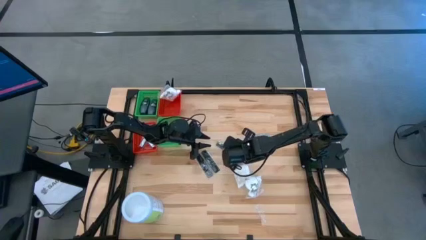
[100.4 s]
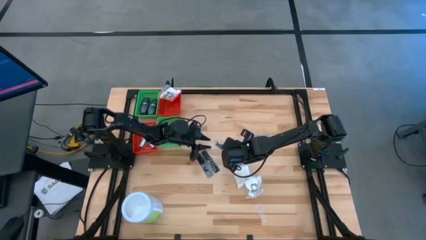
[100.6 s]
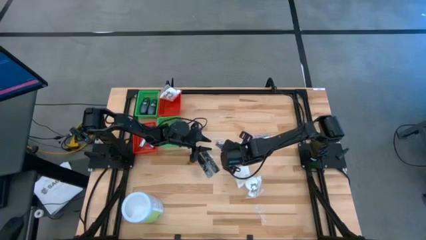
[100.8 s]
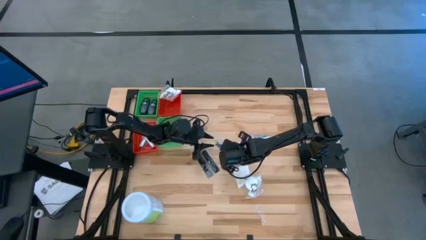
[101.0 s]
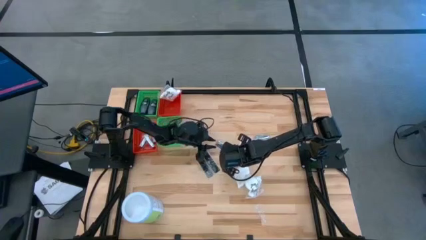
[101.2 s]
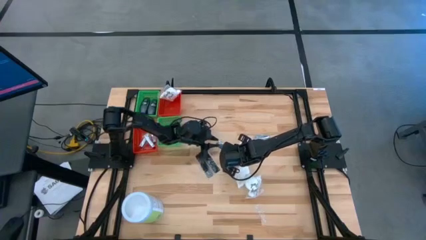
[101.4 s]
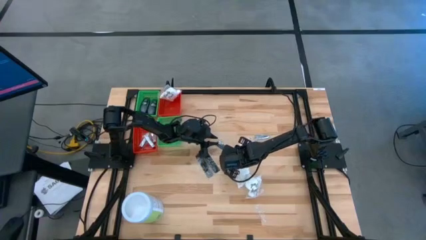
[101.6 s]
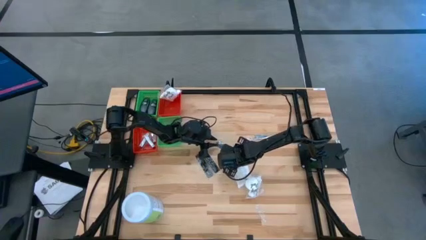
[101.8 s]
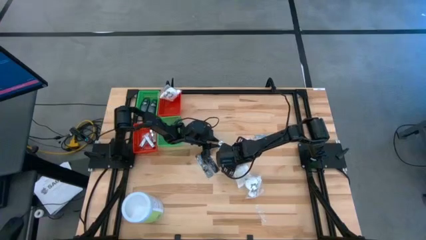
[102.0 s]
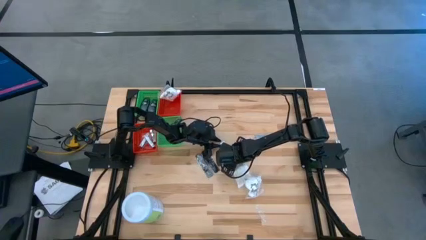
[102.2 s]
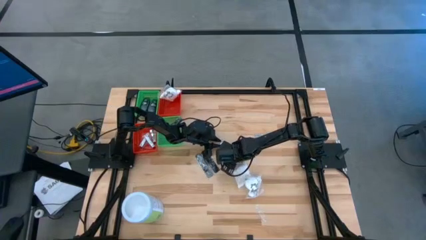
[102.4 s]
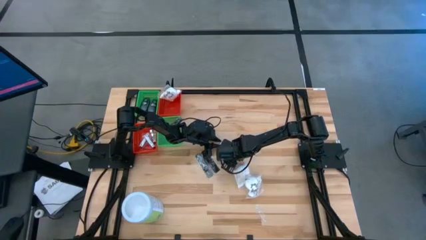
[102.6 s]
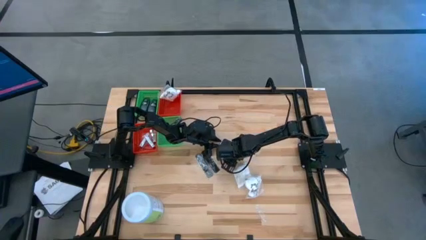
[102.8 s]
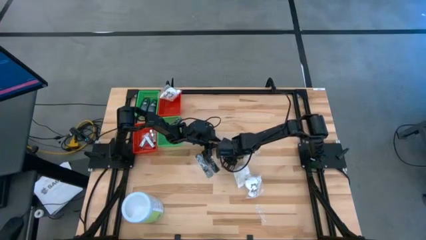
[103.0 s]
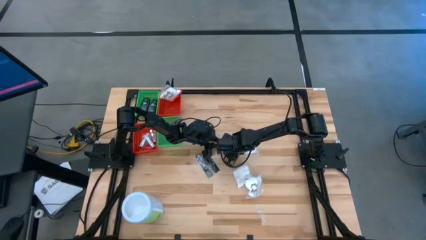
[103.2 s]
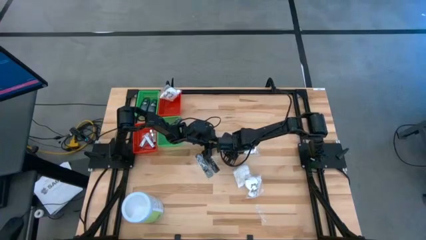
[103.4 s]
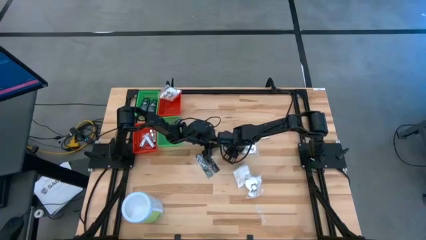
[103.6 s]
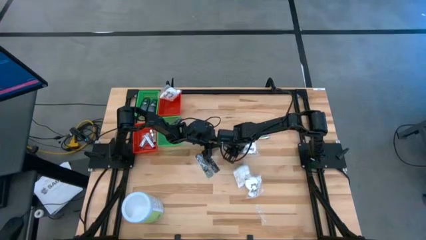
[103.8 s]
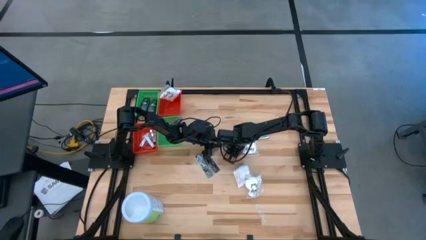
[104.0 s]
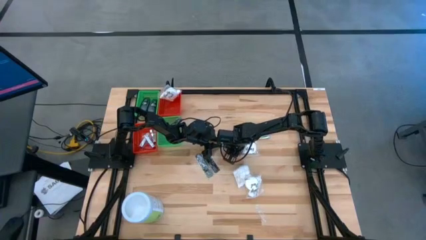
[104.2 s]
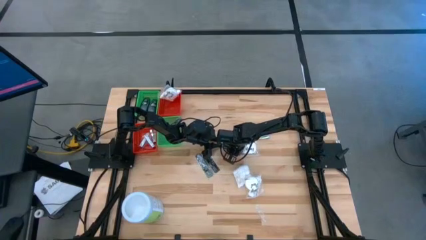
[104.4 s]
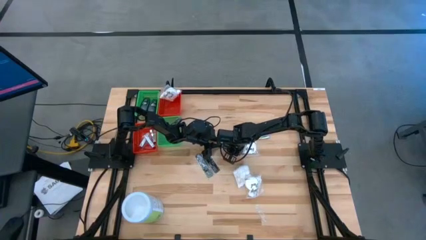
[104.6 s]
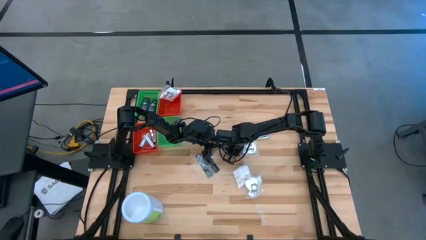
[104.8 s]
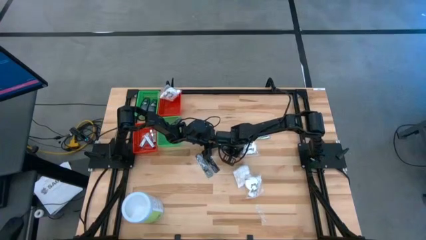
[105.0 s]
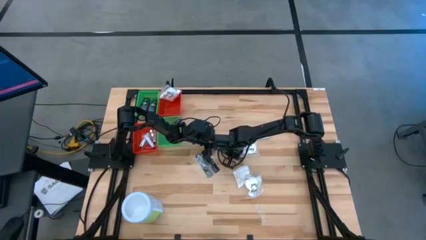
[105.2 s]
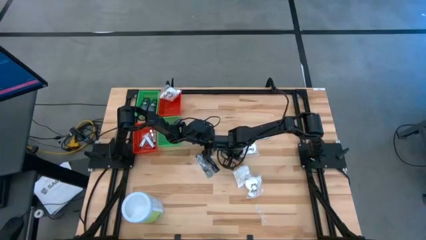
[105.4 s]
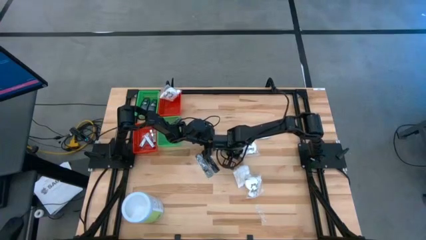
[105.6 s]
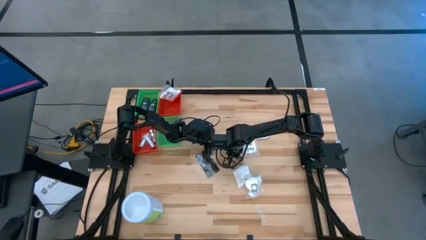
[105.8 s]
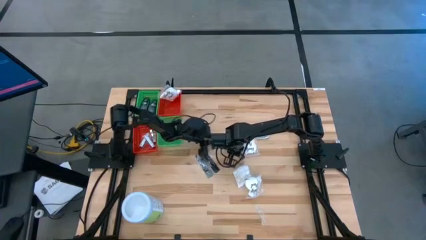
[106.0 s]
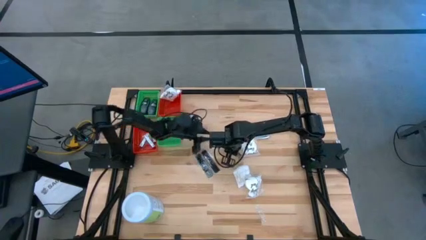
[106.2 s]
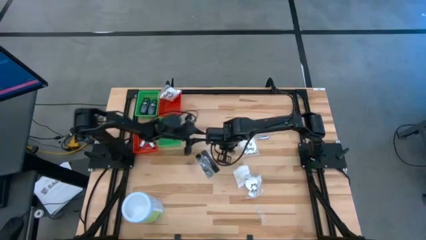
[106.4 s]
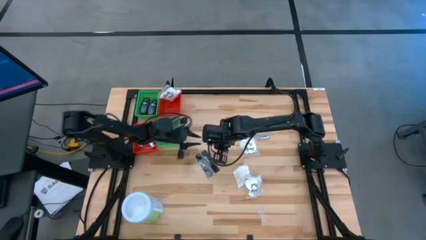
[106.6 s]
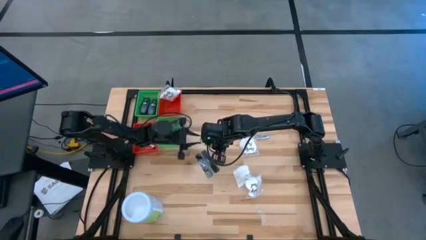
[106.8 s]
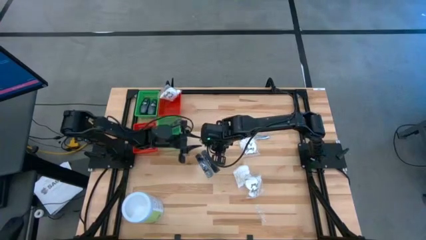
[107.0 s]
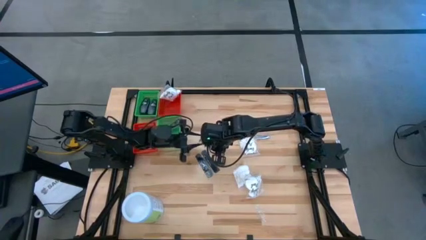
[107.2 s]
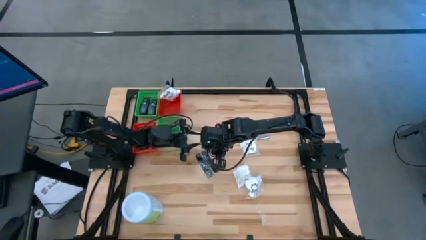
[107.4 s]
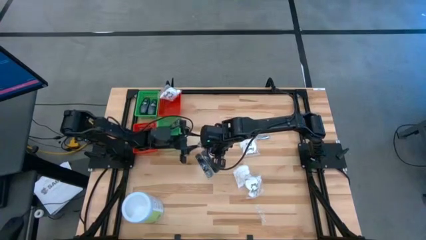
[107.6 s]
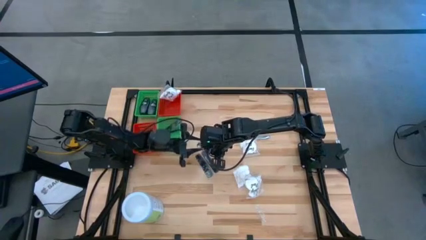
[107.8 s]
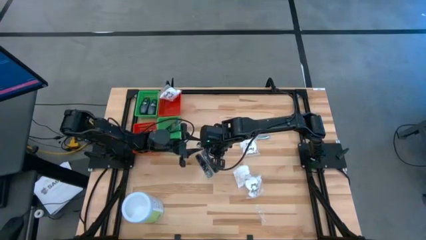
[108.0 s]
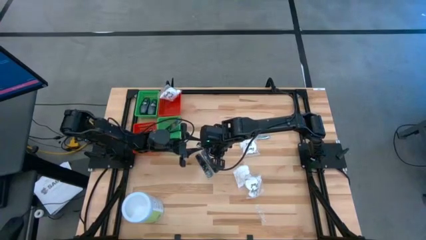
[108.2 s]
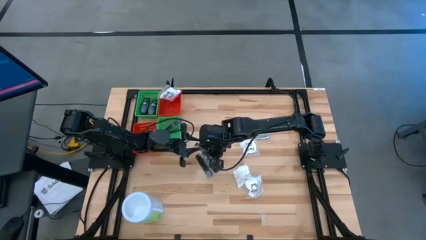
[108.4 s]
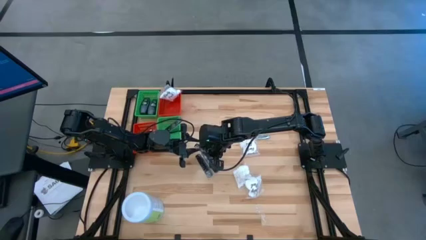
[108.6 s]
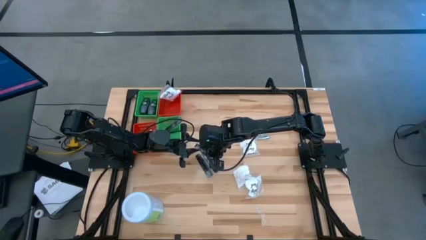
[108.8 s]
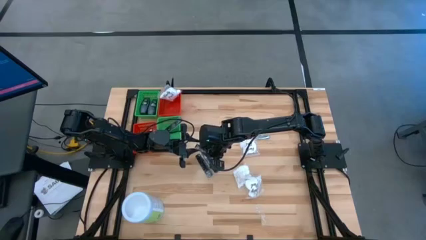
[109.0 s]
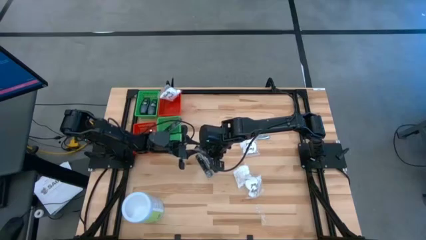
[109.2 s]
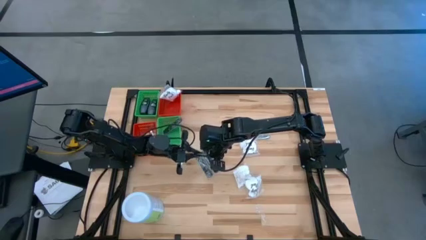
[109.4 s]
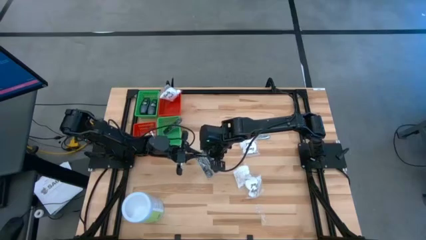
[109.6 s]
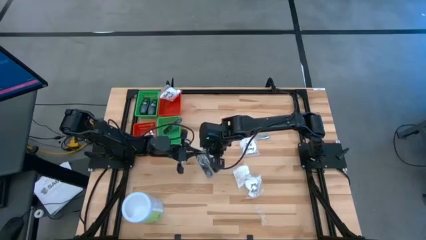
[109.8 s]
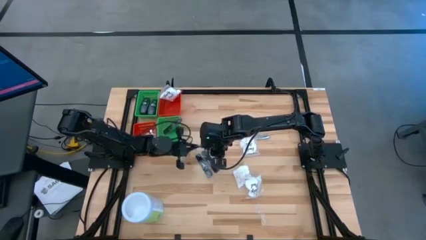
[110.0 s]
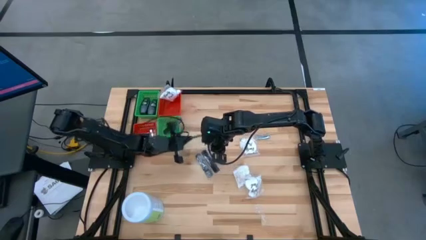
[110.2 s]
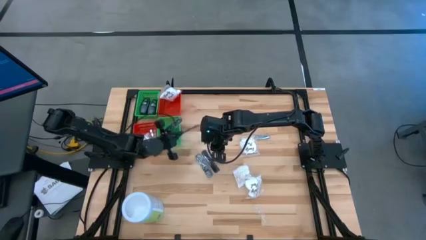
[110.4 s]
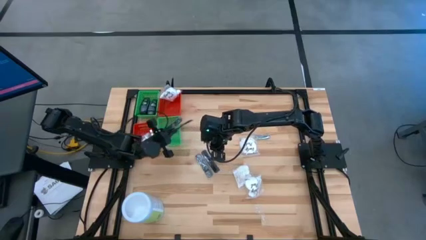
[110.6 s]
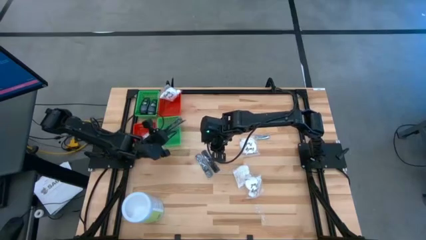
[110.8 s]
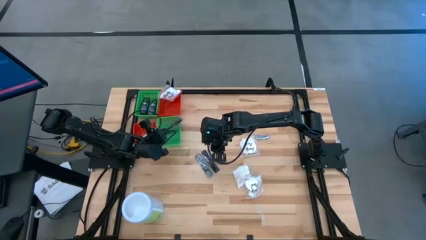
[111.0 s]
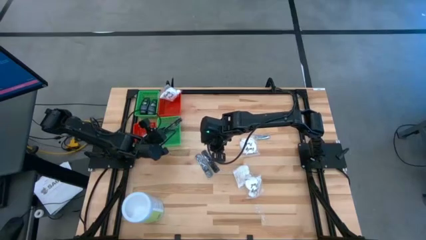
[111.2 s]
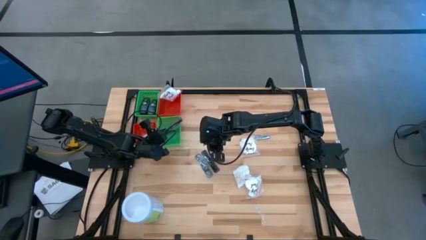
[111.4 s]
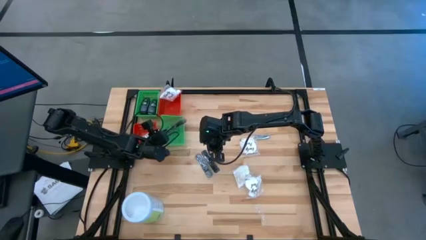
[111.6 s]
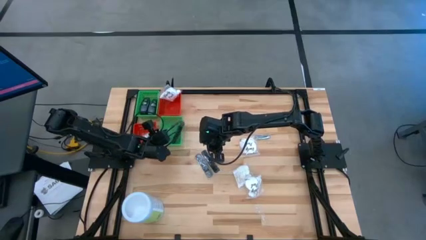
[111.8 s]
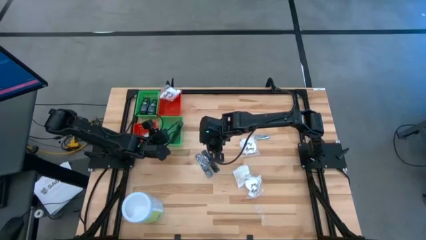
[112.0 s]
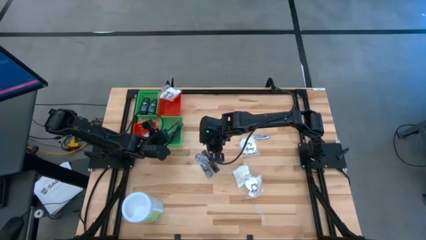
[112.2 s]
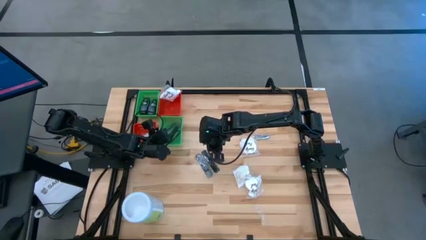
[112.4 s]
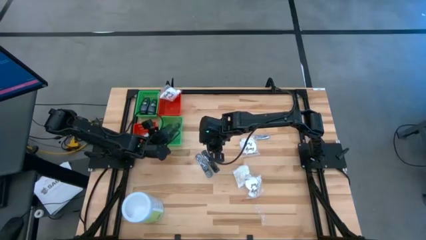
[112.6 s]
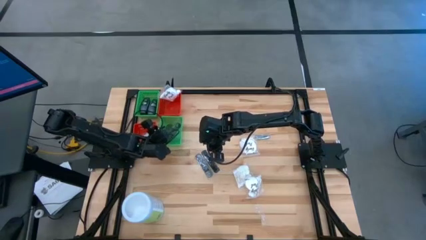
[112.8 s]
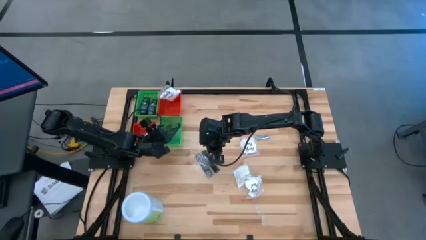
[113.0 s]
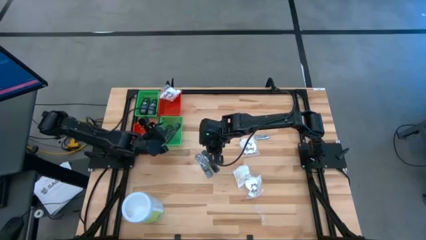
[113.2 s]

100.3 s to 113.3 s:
Task: Pick & Place Travel size toiletries
Put the black comb into the bottom green bin

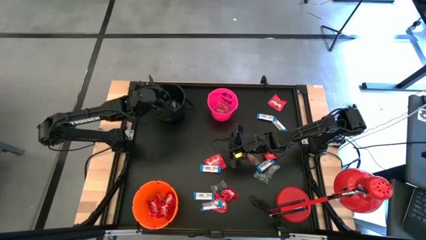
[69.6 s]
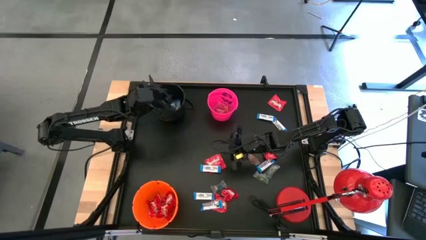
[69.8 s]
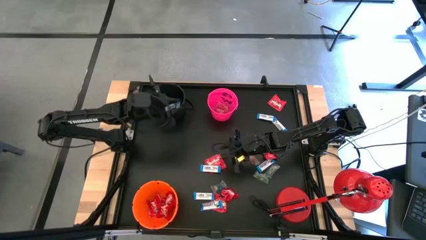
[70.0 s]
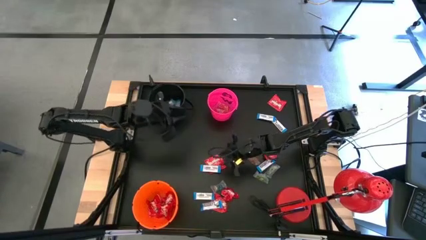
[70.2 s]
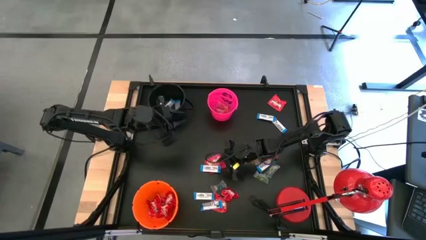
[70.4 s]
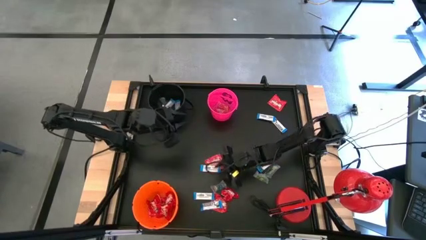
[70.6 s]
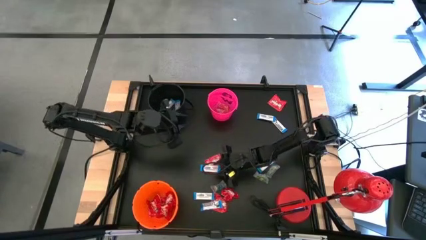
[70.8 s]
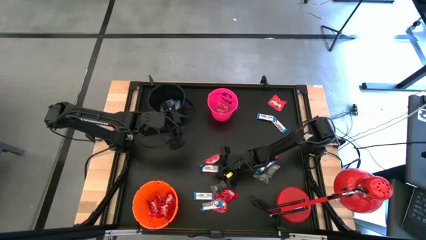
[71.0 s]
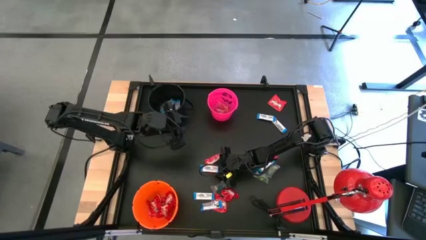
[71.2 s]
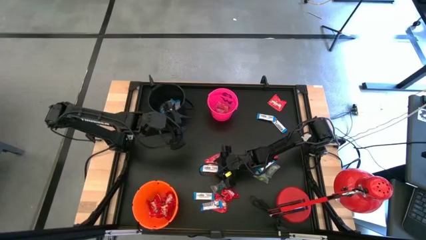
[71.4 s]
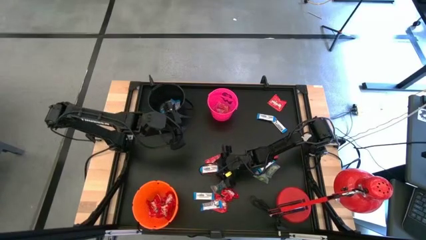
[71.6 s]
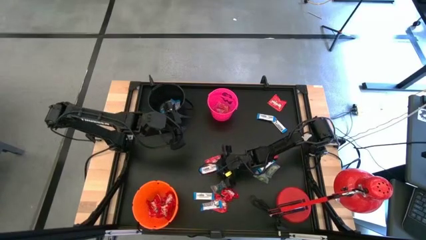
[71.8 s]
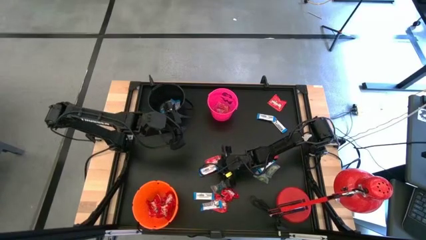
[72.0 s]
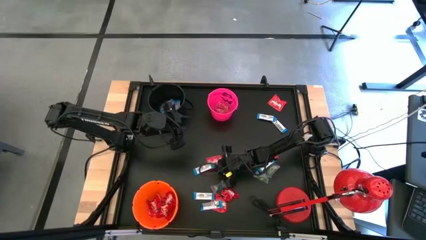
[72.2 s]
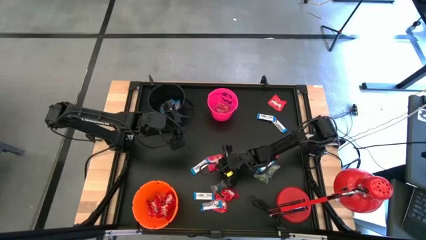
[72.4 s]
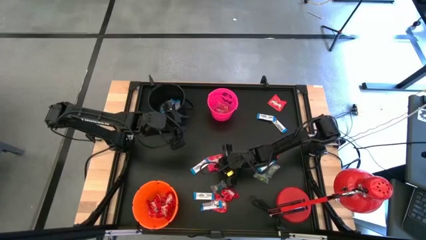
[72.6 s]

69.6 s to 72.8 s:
Task: Organize candy in baskets
Put the red candy into the orange bucket
